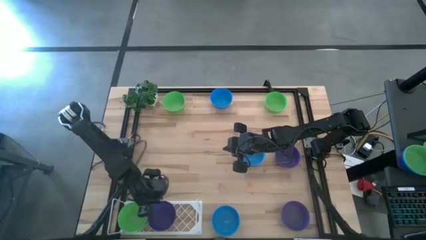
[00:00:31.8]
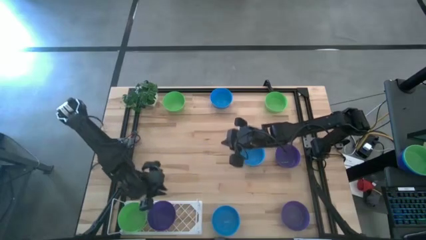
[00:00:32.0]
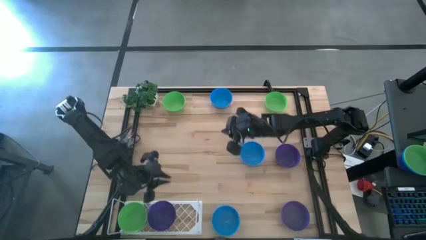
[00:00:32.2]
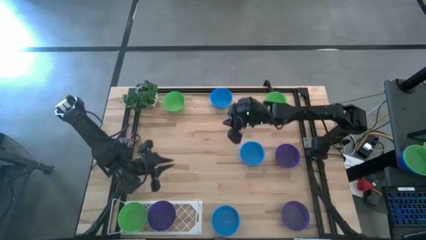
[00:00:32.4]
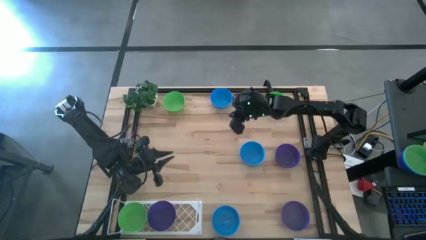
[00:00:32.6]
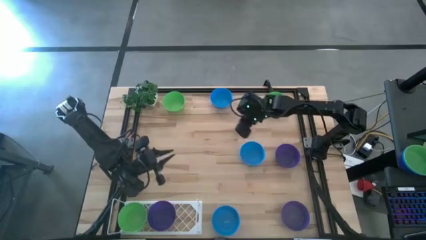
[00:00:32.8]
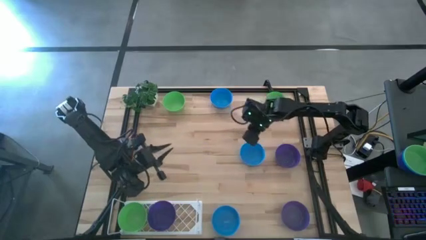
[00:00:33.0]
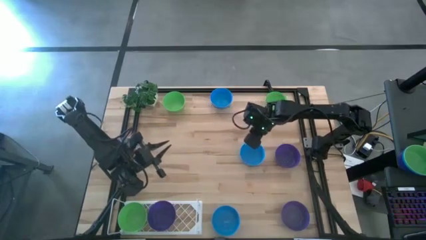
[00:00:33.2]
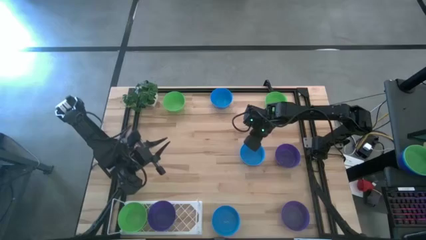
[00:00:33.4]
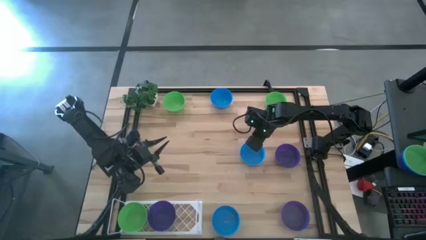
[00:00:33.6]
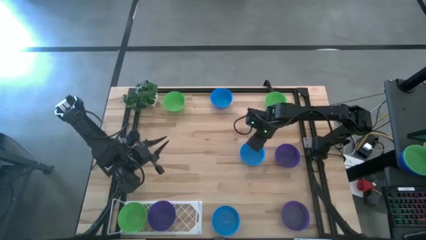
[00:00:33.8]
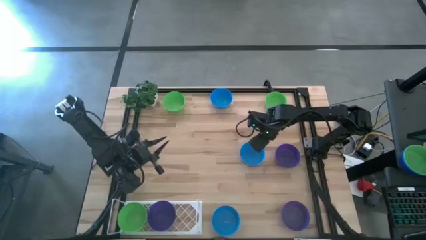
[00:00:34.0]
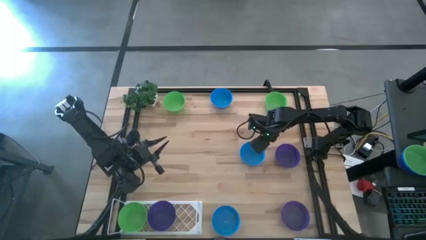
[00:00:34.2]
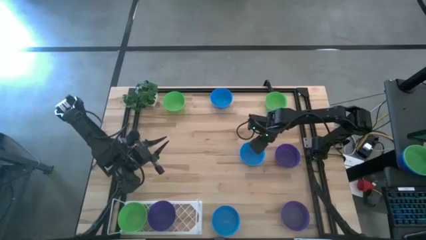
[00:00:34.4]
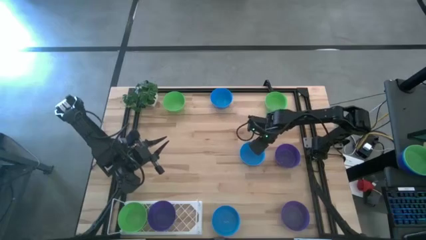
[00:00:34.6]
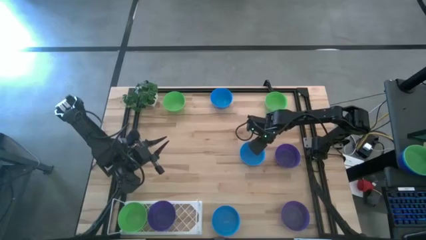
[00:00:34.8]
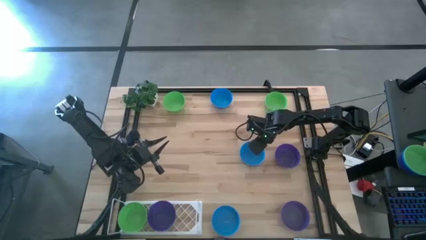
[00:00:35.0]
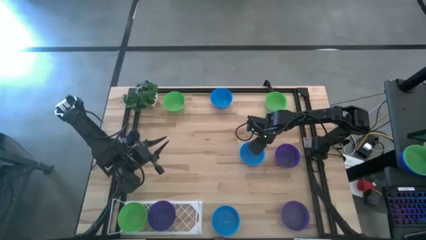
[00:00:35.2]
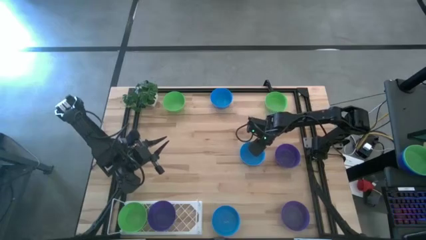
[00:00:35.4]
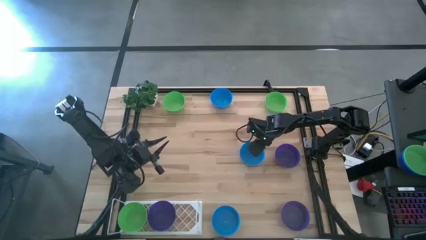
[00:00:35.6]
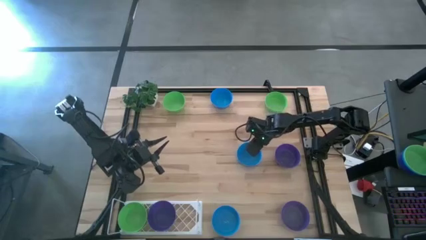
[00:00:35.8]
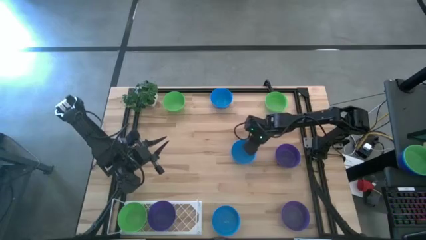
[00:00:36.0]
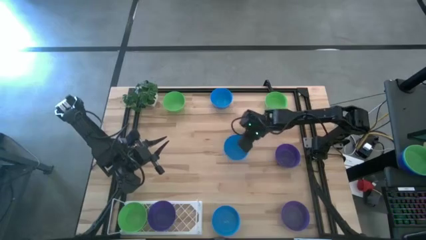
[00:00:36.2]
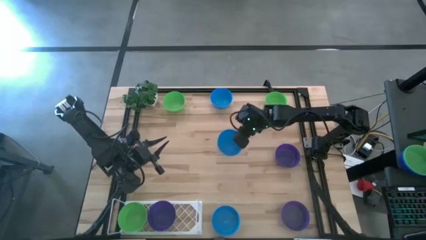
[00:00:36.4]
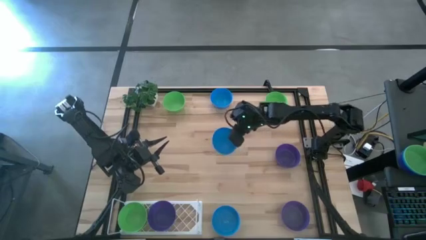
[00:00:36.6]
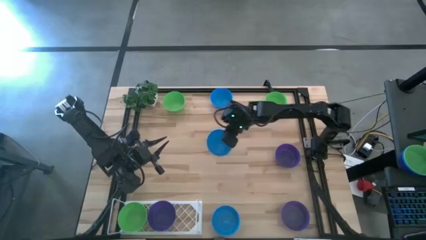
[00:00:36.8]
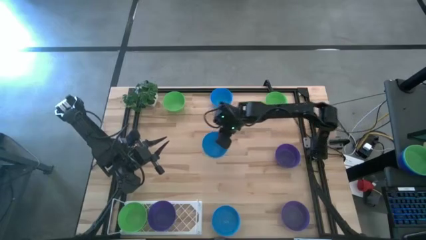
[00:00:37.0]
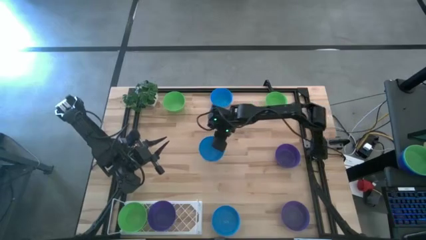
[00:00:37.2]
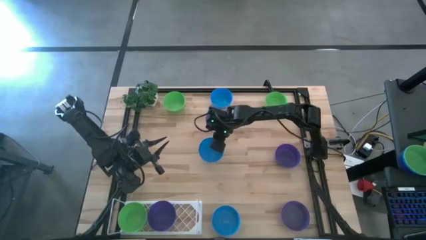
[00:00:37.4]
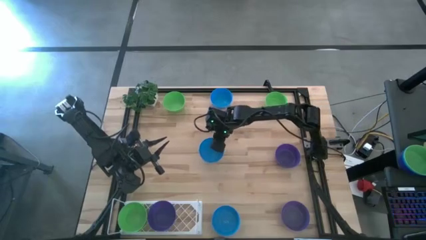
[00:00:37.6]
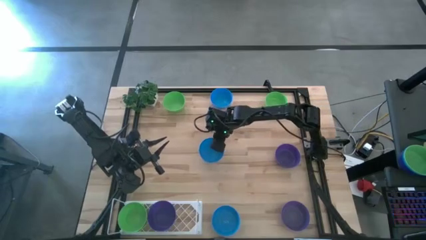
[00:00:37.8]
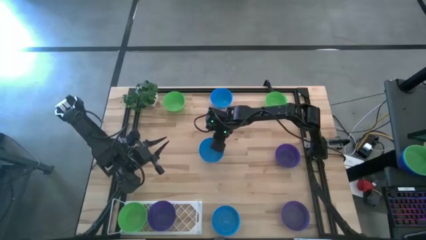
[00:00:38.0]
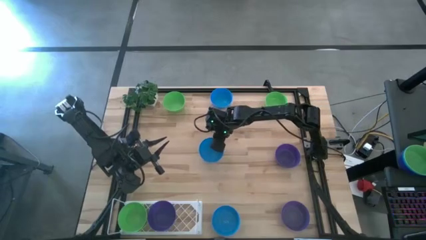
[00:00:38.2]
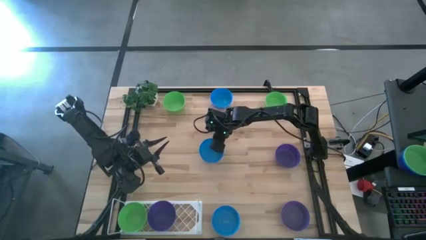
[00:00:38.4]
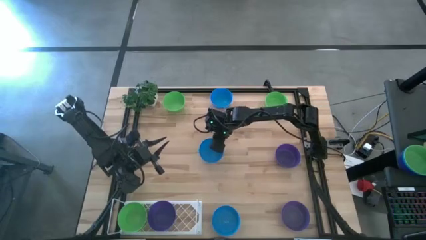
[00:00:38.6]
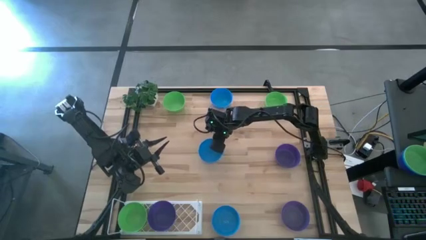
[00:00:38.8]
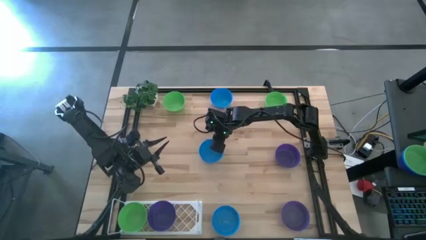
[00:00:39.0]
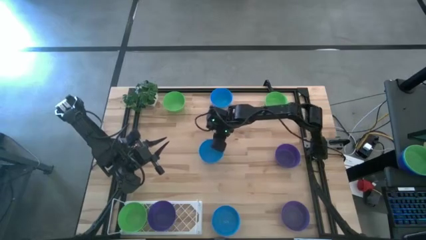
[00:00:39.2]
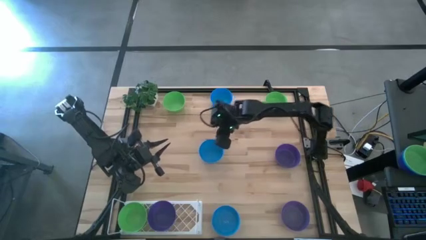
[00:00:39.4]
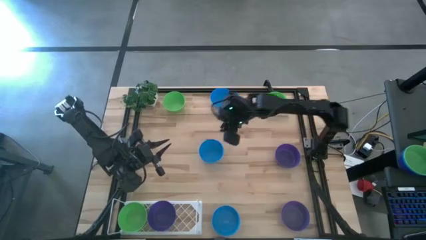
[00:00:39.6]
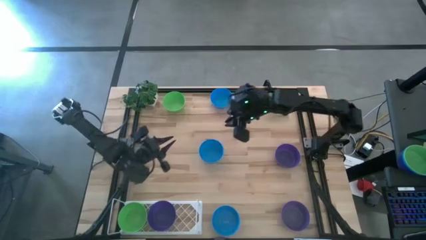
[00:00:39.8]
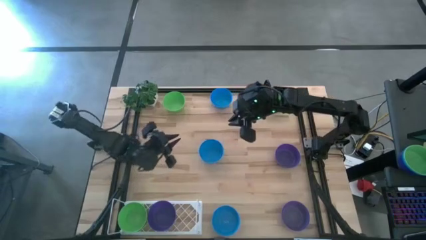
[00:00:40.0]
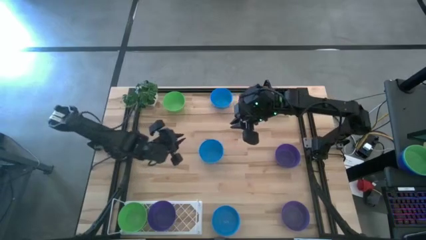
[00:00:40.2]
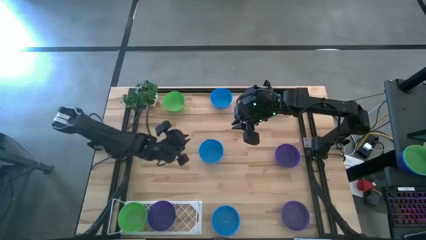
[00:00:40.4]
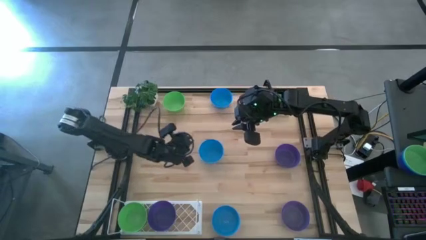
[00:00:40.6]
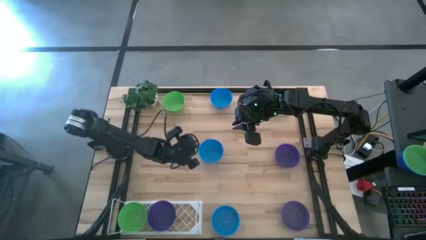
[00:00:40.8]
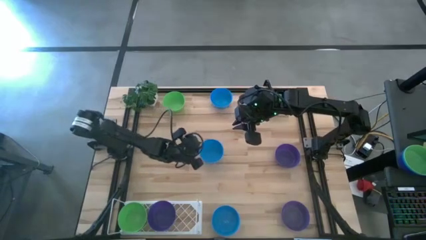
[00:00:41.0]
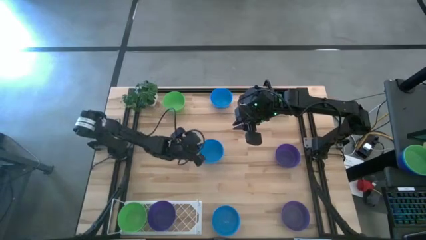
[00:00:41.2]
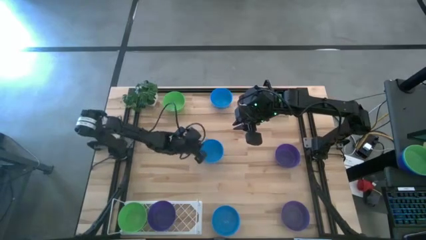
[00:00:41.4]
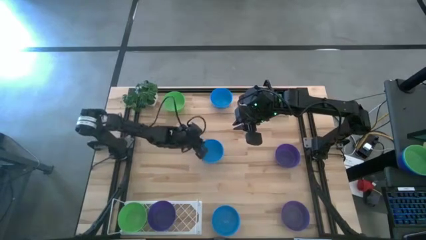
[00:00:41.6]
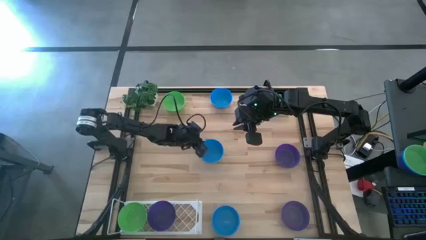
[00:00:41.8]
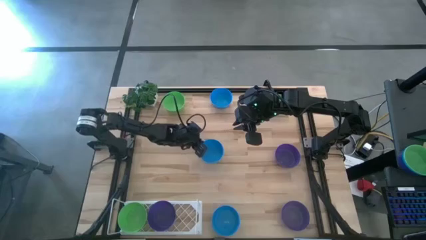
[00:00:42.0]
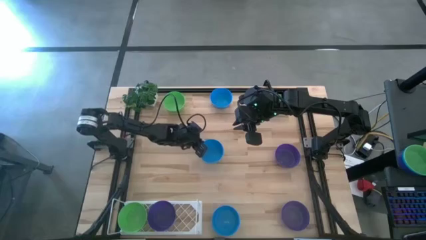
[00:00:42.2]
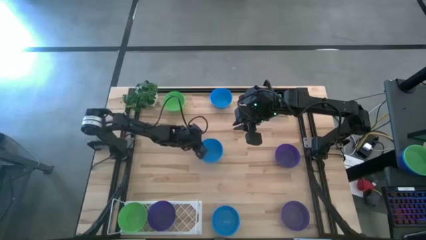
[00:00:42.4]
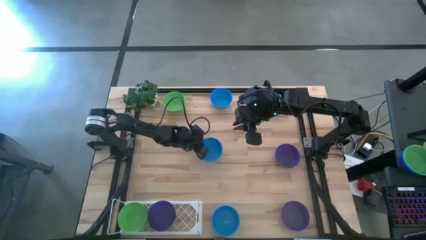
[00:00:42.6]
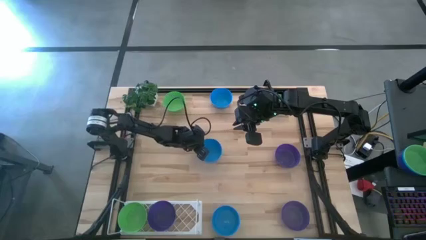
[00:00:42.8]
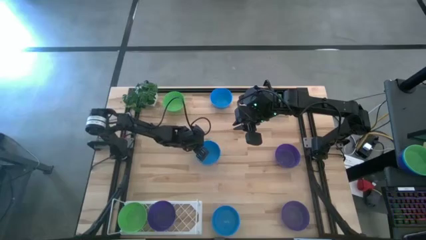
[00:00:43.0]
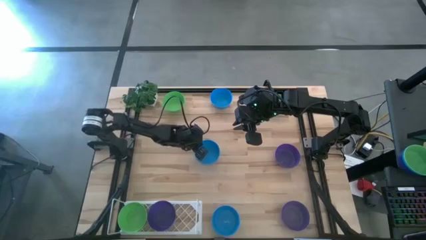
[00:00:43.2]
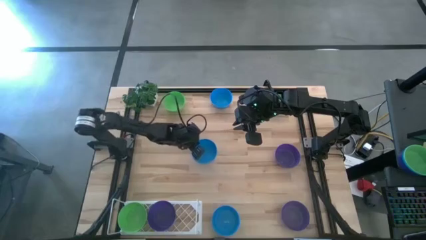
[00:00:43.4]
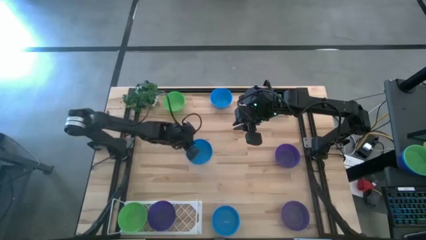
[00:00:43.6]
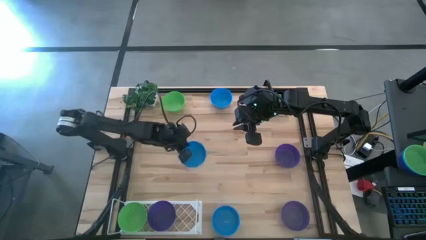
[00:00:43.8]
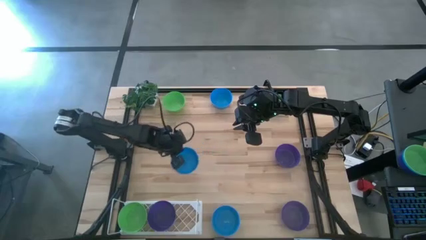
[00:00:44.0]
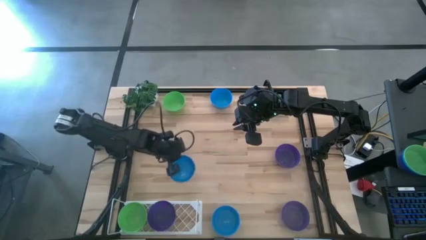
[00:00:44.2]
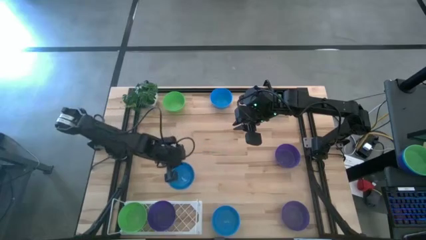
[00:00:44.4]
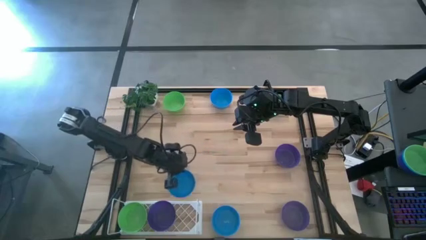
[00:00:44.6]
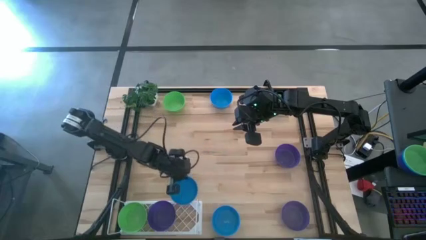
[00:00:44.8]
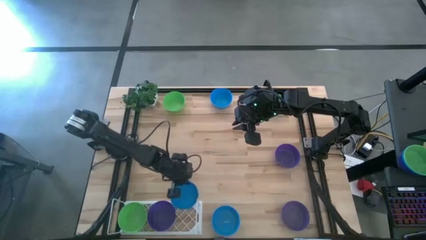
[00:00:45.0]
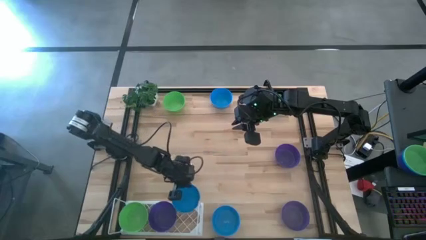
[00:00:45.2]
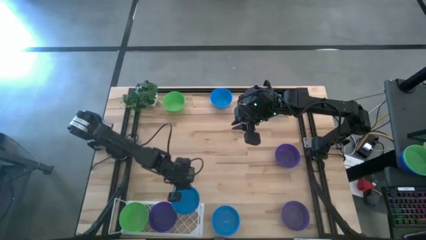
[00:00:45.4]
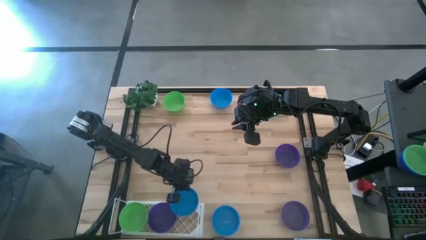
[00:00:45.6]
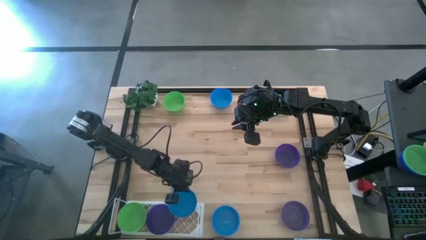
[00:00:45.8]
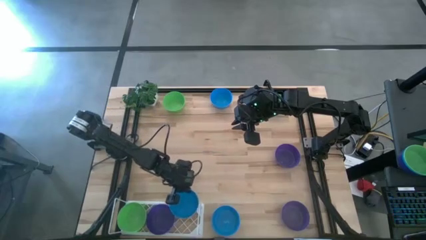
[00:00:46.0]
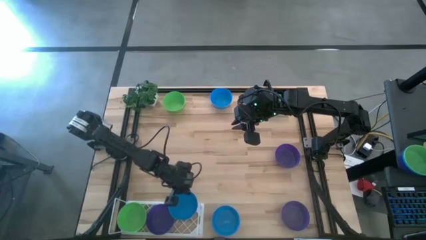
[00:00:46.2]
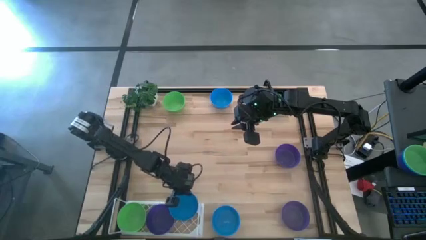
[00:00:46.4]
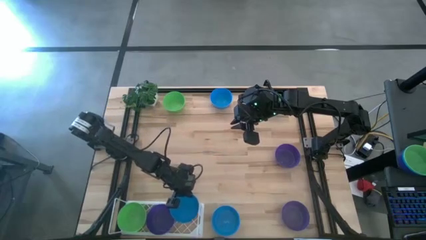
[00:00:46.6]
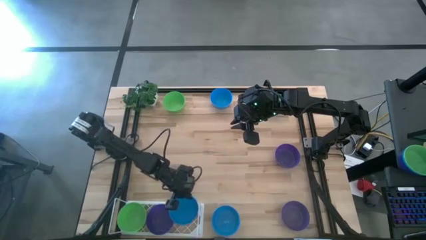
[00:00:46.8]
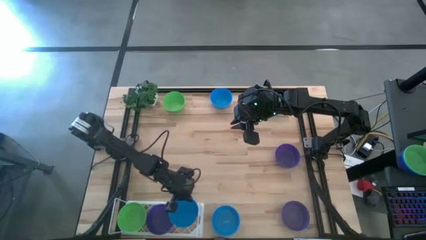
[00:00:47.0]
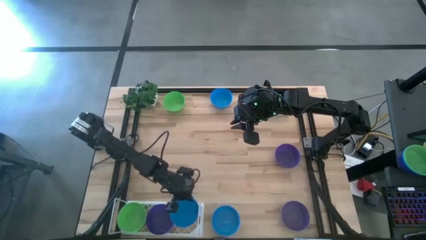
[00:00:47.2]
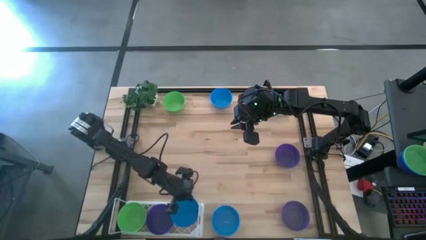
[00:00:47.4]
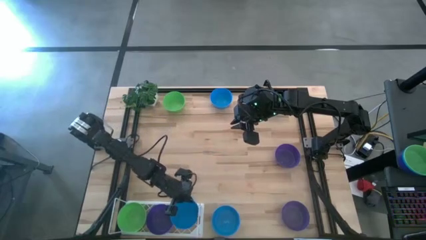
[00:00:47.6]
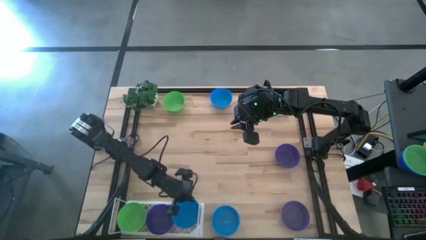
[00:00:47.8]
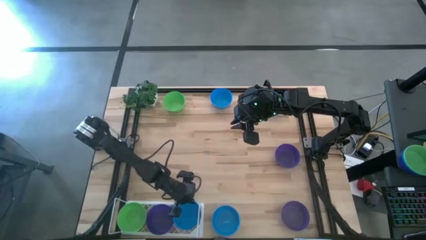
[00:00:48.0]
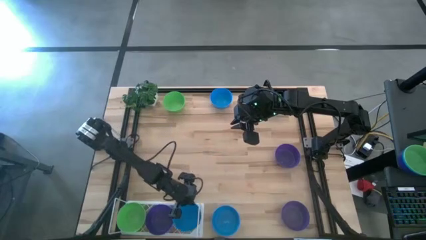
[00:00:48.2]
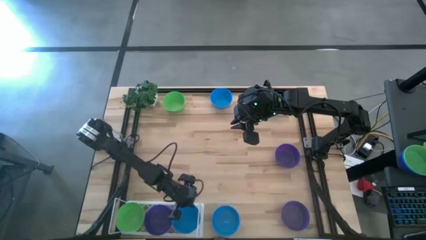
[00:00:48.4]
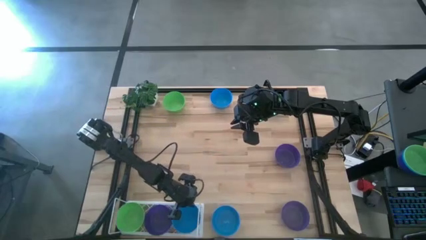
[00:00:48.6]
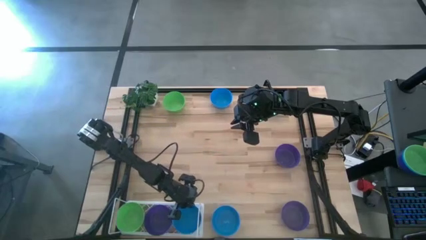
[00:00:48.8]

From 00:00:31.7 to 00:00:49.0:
Task: Pick & Place Mini bowls
Put the middle light blue bowl on the shelf
